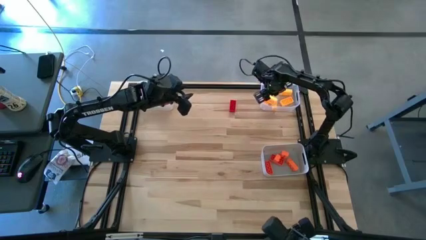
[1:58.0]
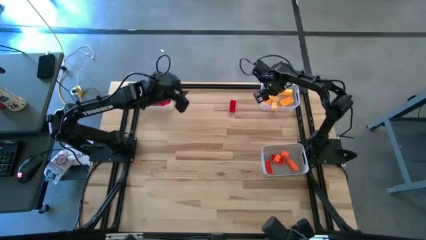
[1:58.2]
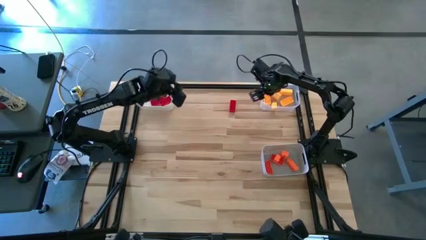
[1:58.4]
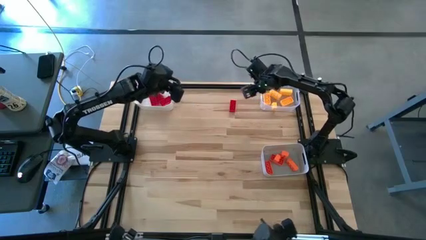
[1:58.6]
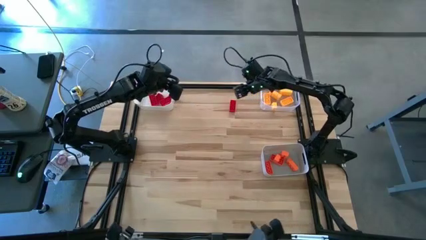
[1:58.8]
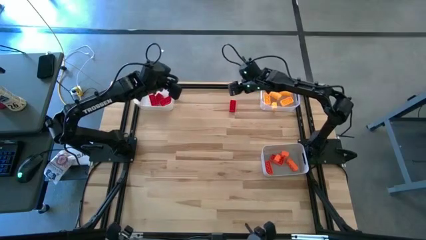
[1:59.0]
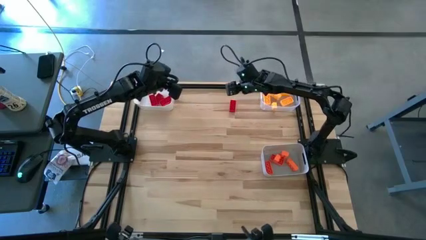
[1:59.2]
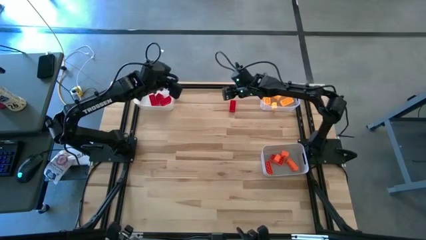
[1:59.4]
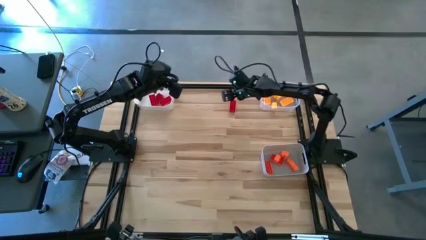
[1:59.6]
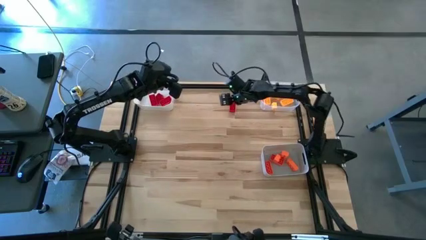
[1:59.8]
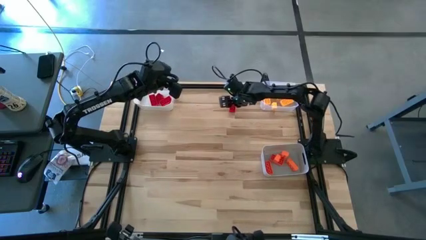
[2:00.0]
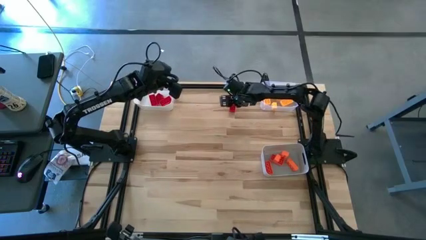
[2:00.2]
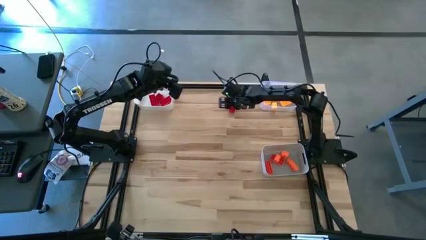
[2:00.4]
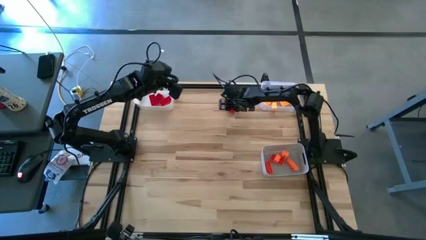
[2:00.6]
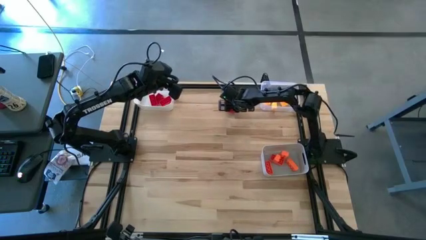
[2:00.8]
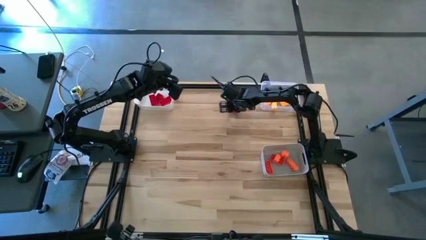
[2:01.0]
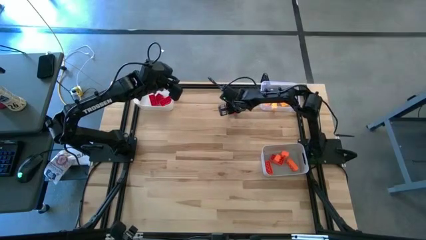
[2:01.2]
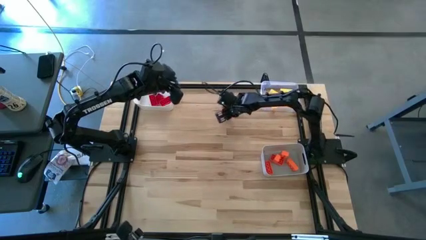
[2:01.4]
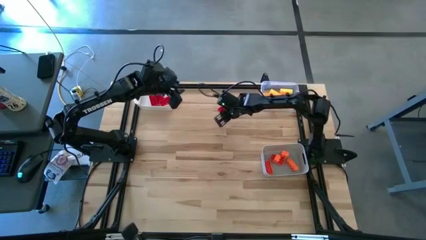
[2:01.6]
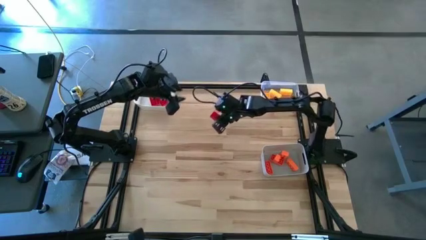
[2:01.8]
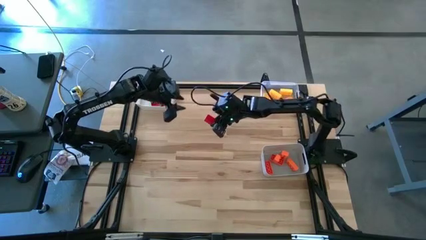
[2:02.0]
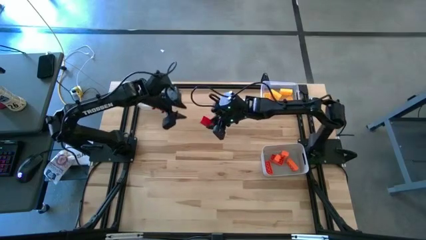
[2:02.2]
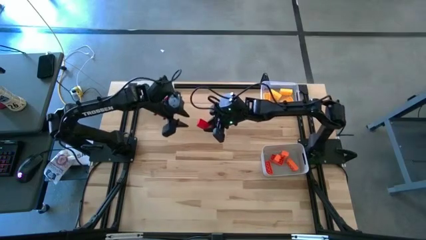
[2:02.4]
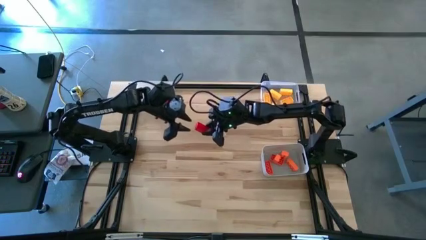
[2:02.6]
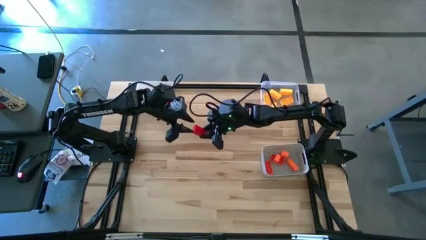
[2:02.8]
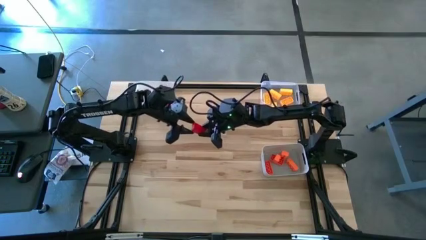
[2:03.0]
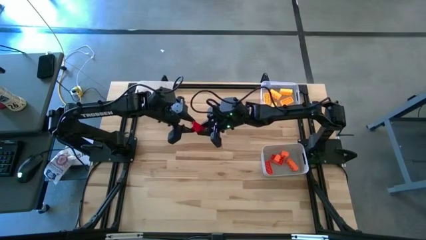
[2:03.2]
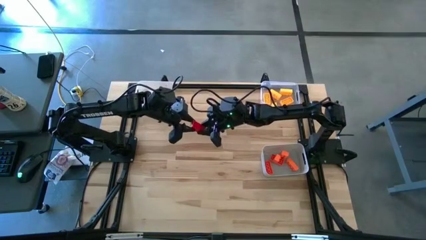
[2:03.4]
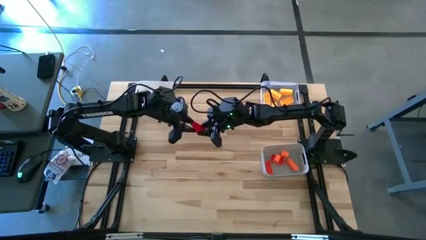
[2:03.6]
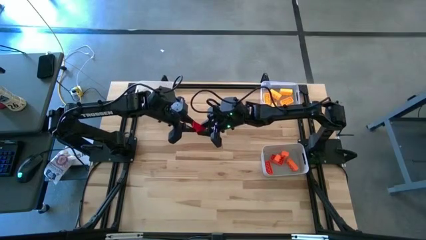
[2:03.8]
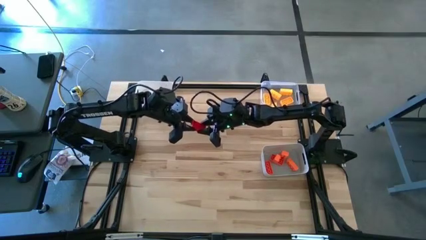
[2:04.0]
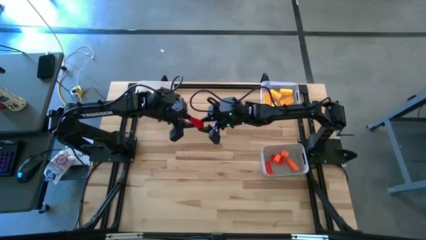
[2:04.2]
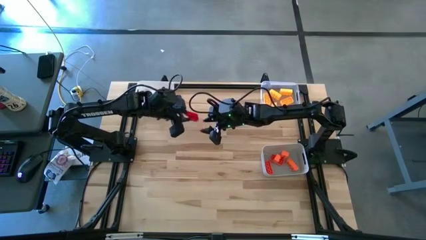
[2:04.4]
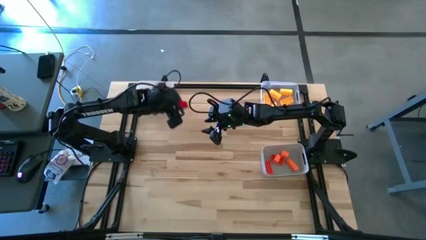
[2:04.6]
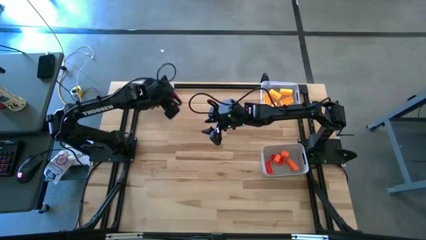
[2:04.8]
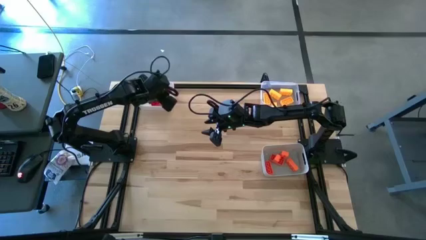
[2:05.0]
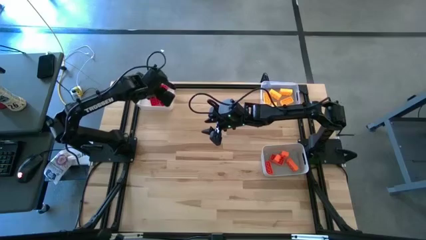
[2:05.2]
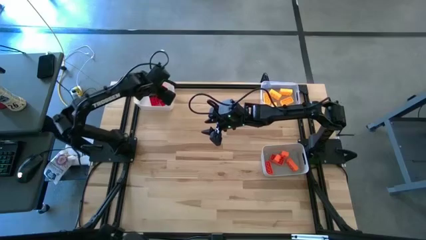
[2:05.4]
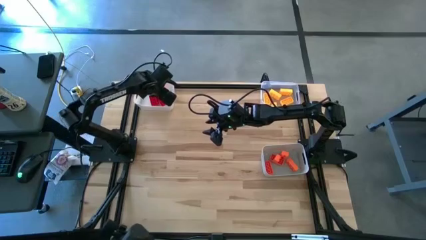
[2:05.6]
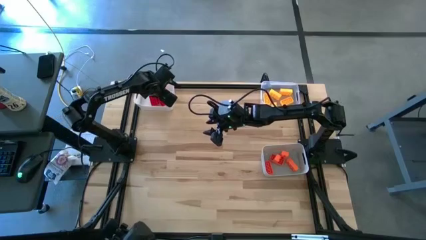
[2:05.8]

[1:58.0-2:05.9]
Task: Sort & place blocks by color
Put the red game piece into the white bin

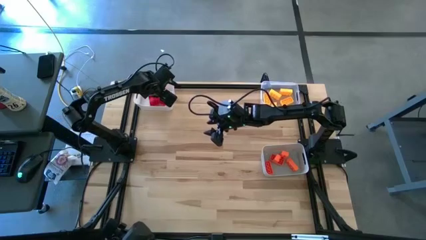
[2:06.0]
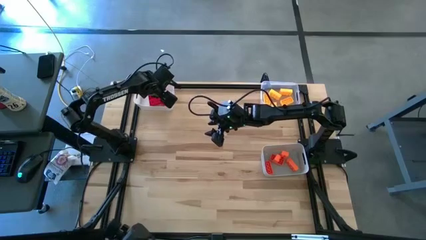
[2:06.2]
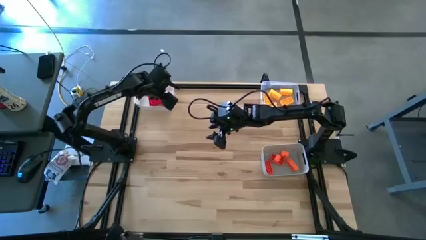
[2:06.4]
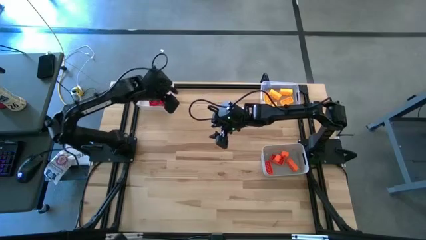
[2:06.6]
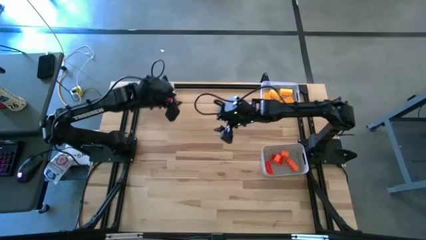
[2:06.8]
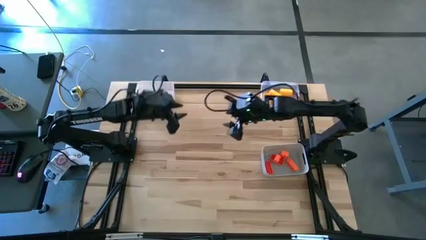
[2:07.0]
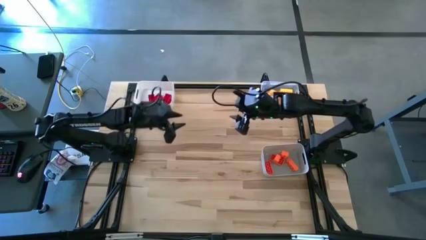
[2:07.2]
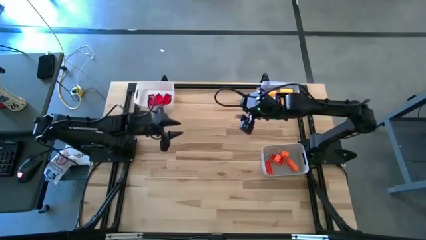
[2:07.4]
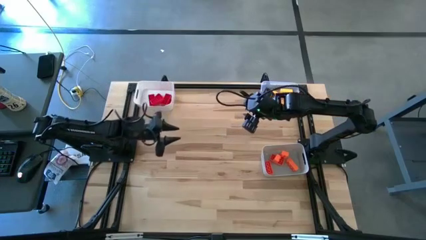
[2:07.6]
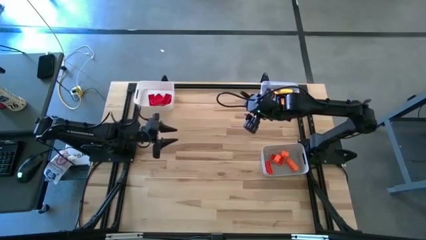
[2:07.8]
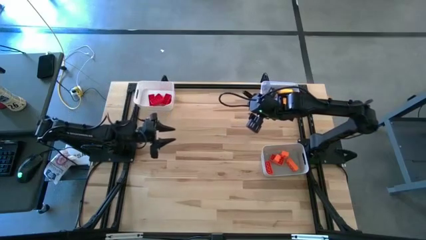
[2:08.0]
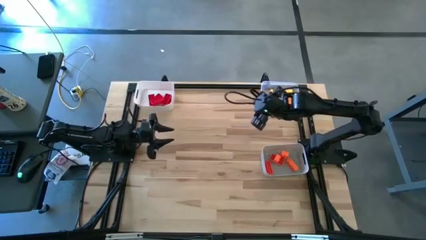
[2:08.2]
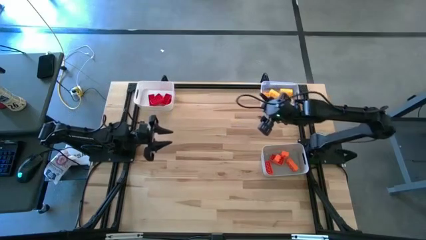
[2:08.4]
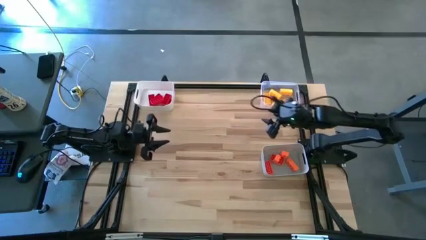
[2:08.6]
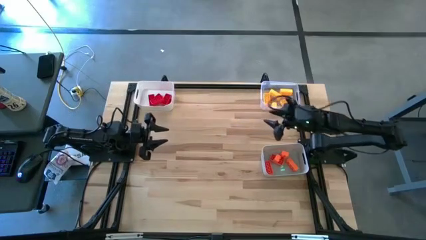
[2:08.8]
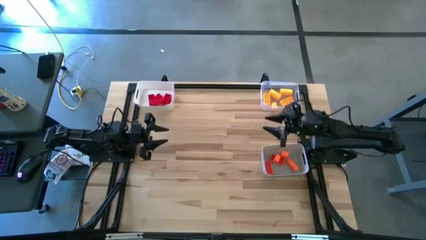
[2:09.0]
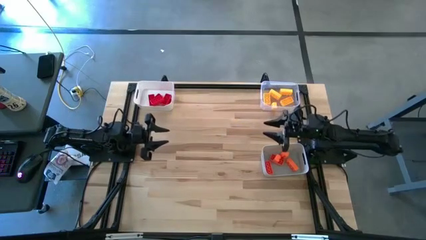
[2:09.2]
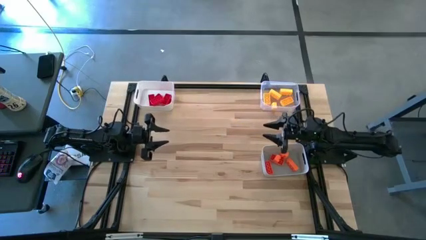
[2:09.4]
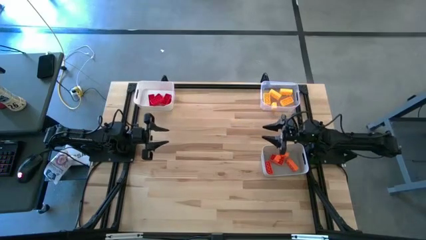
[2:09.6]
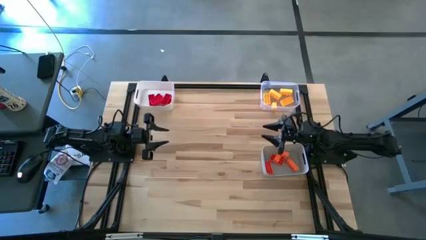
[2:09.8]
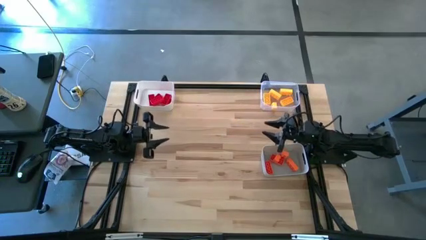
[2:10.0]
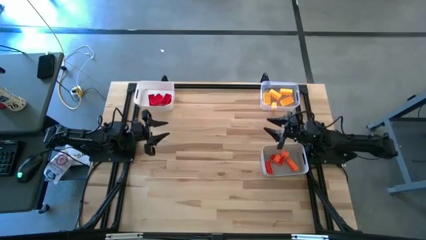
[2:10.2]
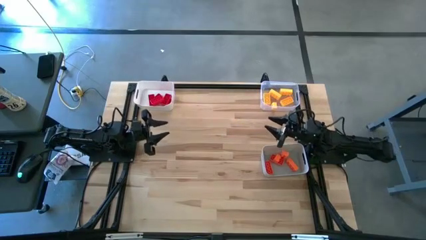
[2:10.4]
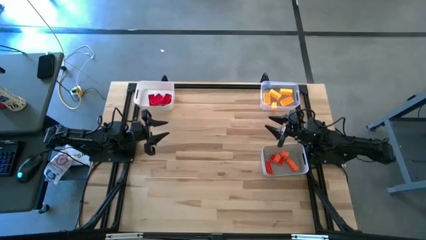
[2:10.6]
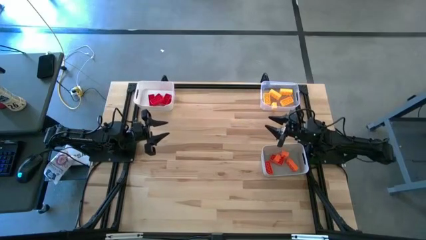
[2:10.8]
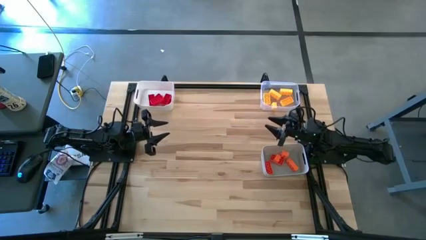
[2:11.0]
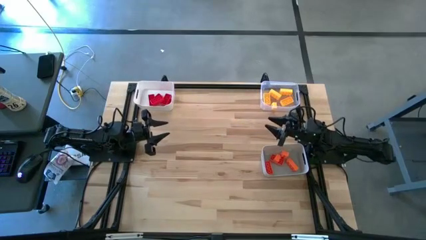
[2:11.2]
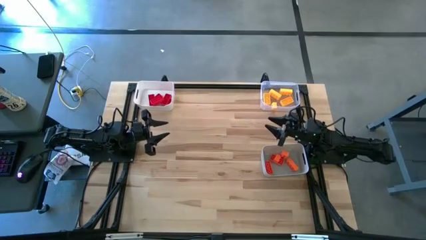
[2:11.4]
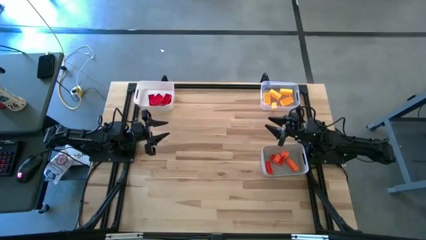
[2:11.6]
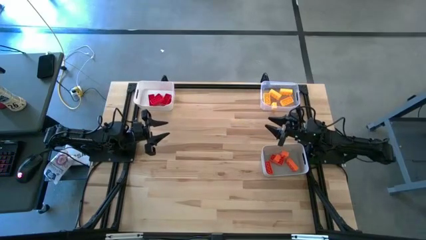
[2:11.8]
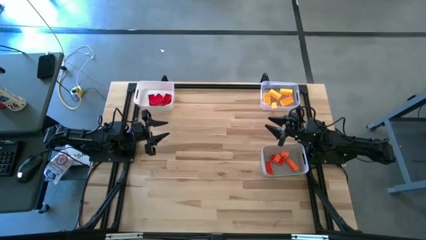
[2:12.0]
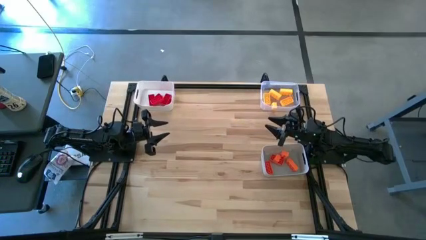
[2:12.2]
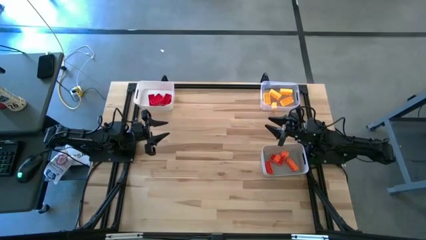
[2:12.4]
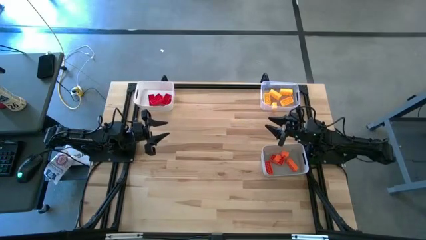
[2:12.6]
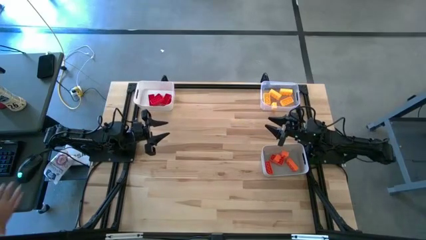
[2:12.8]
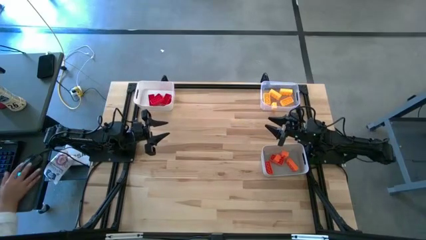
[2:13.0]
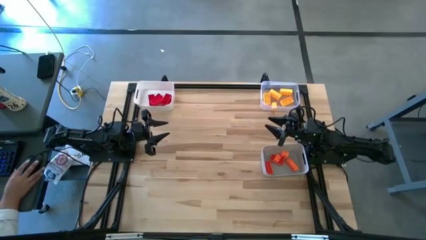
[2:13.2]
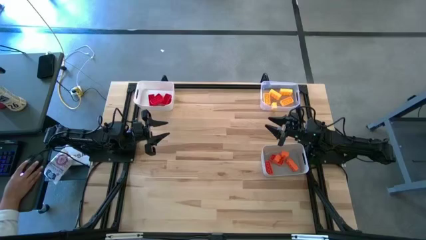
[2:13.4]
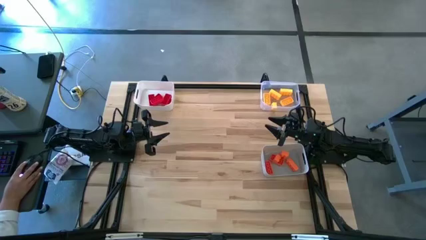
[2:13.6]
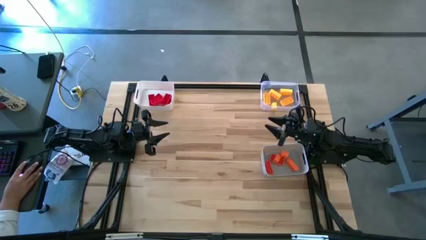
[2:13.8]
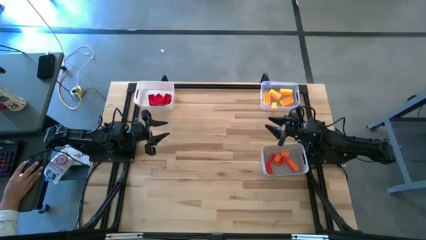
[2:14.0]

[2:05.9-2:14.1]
Return to Home Position
